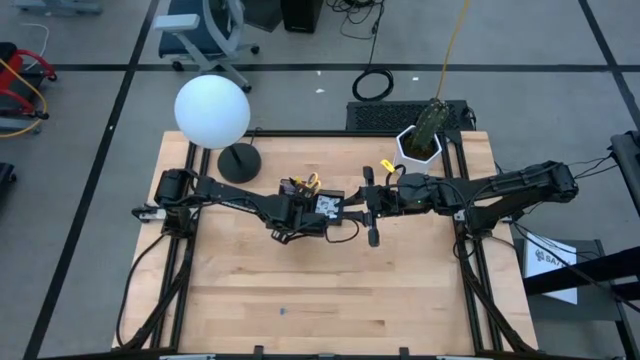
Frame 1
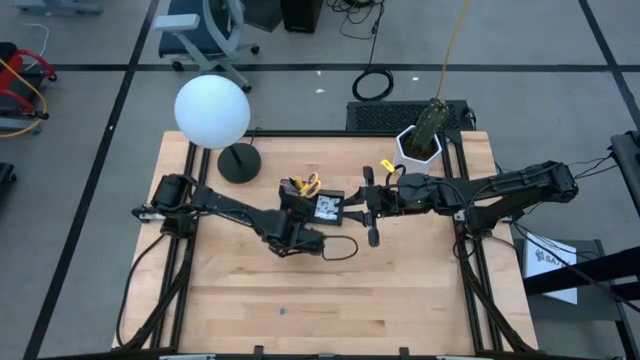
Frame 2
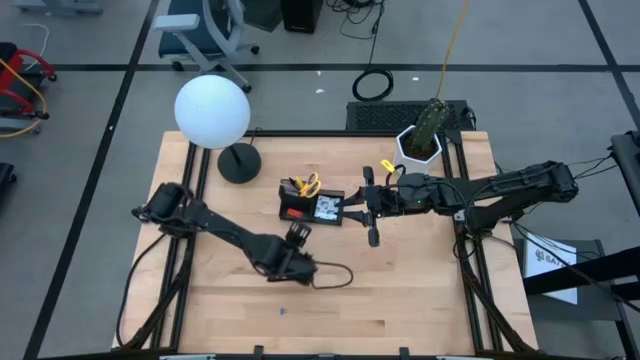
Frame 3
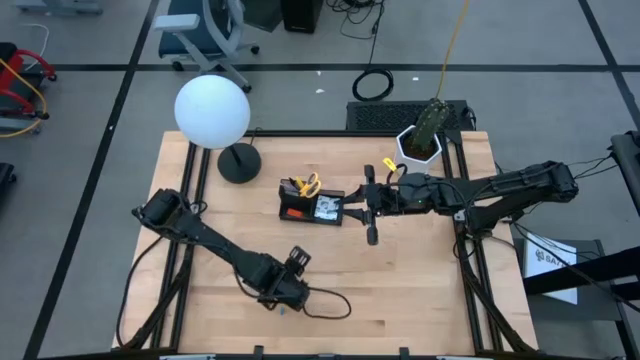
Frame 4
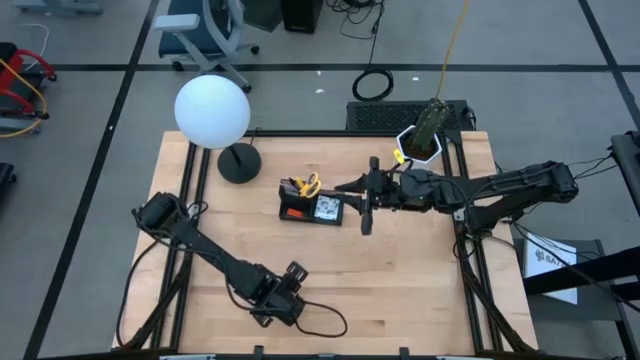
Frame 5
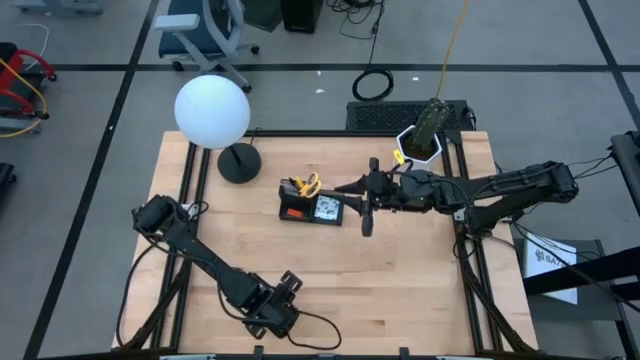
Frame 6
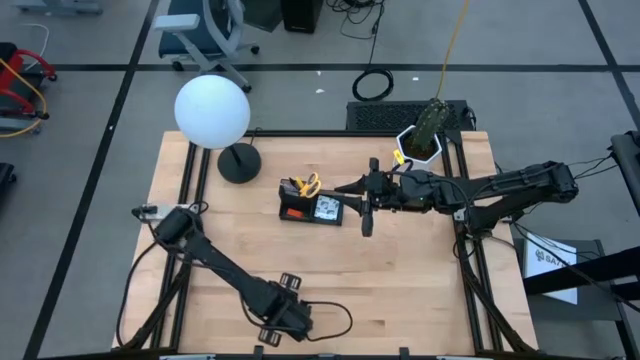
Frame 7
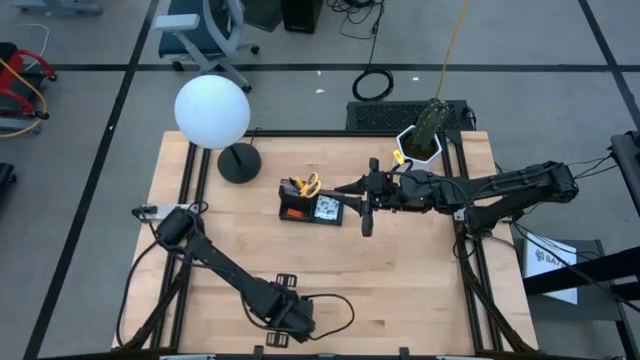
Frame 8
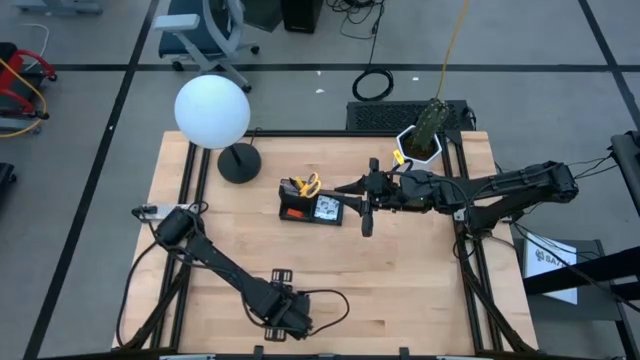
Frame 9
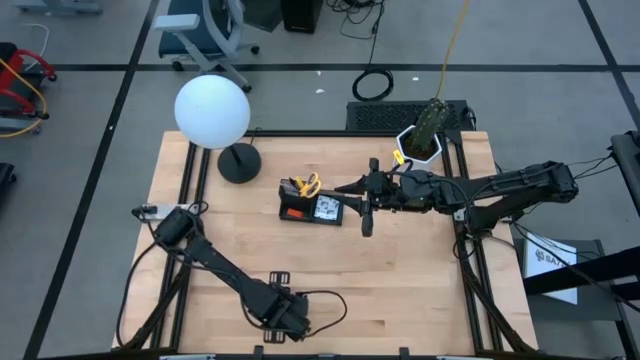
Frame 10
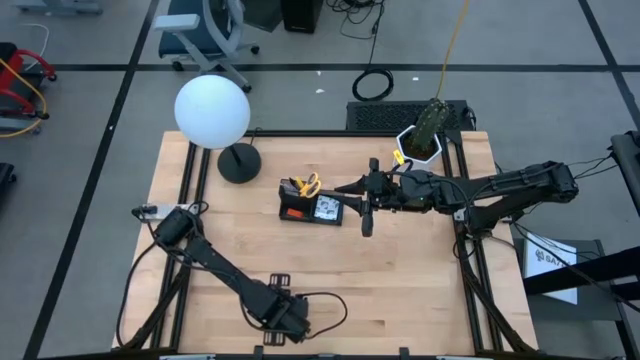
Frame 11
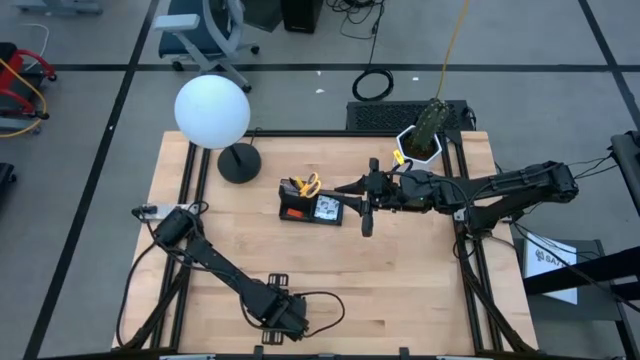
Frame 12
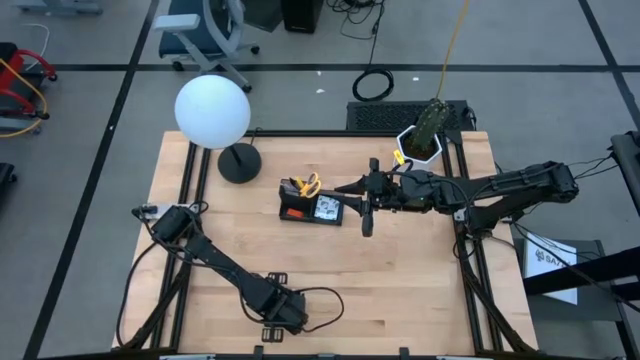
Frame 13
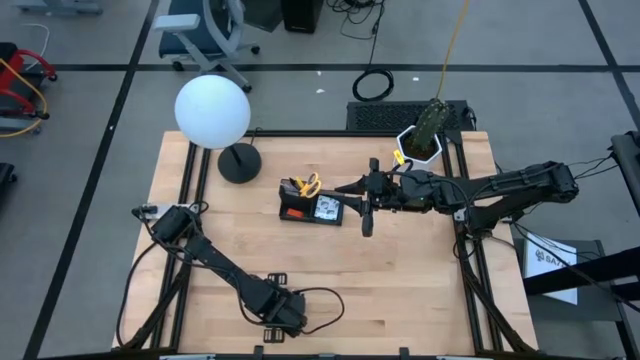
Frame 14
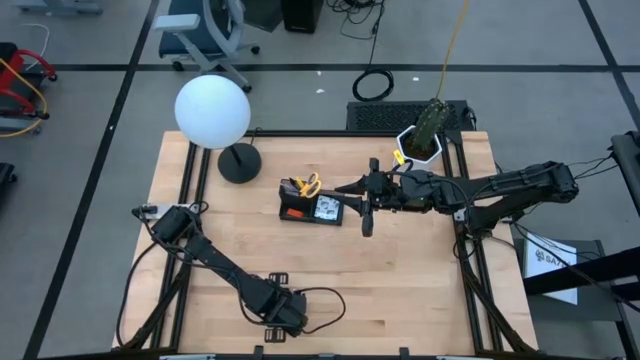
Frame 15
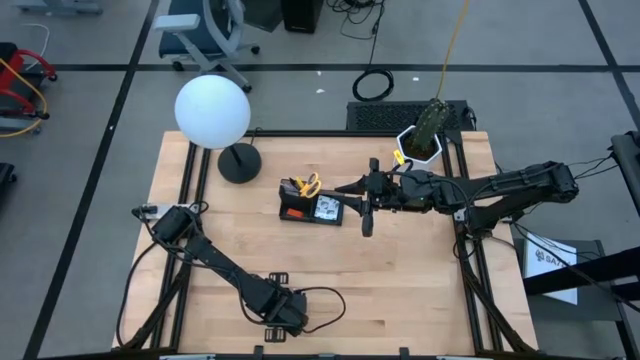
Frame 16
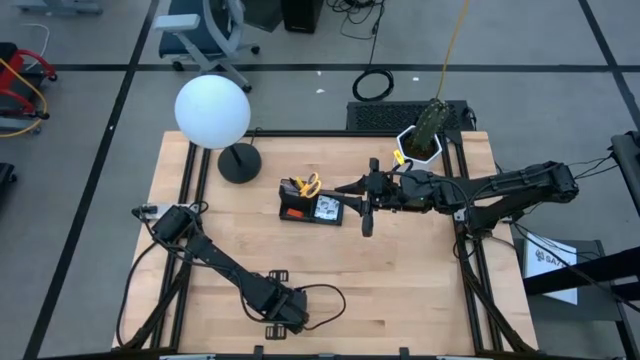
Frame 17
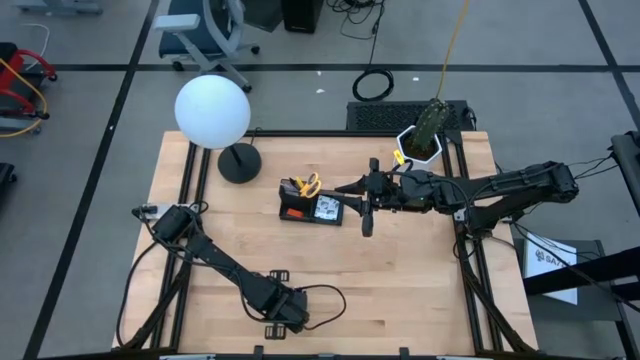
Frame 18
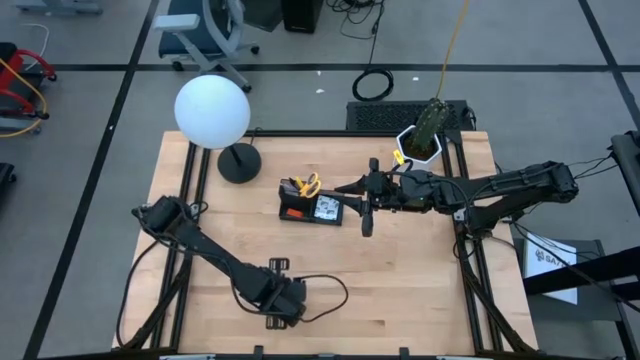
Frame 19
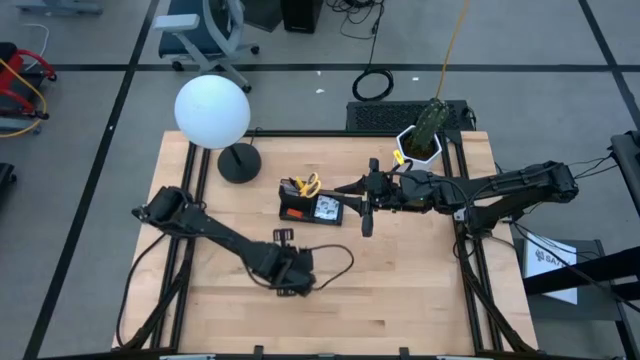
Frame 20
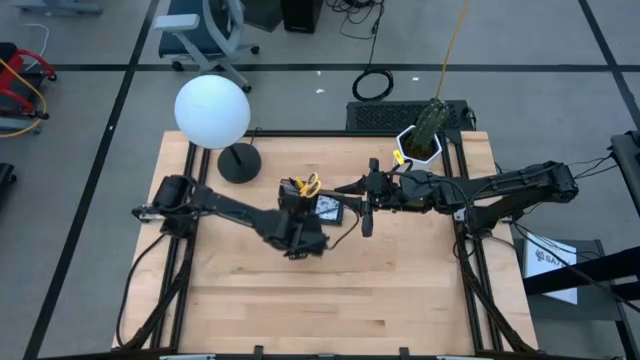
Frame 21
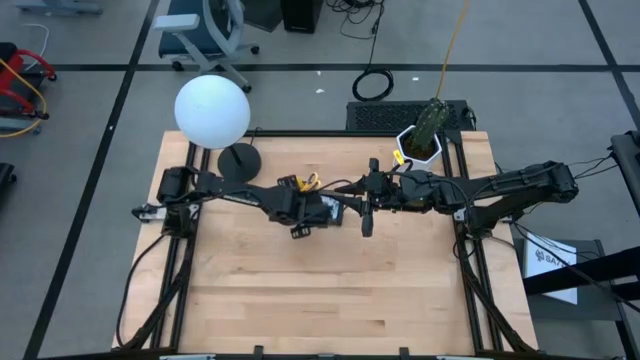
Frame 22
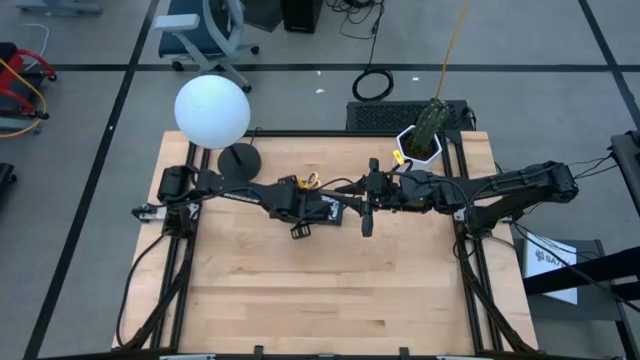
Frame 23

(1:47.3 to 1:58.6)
Task: Pick and place office supplies into organizer
Put the blue binder clip into the desk organizer

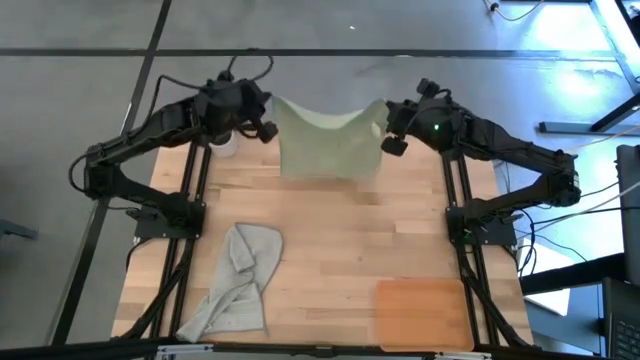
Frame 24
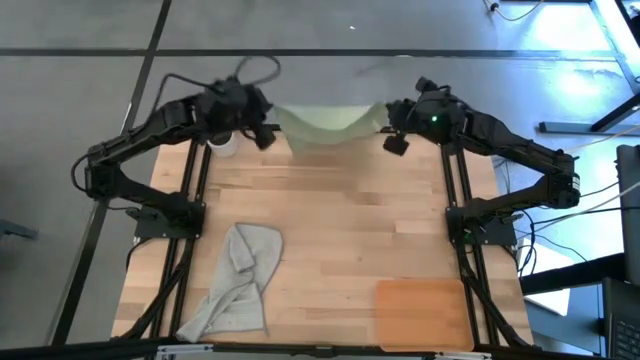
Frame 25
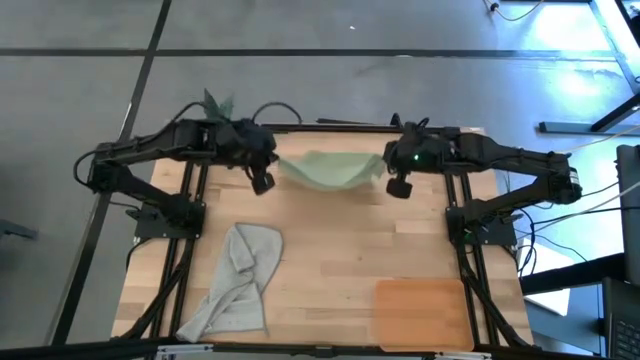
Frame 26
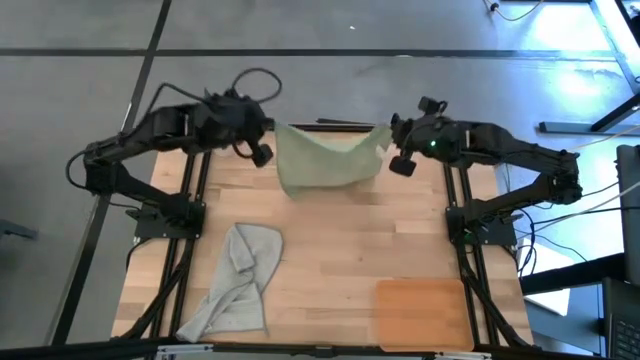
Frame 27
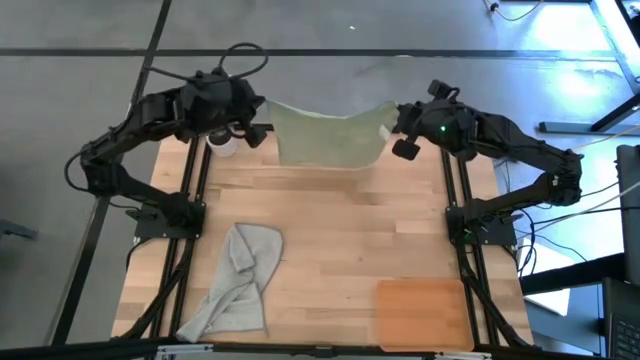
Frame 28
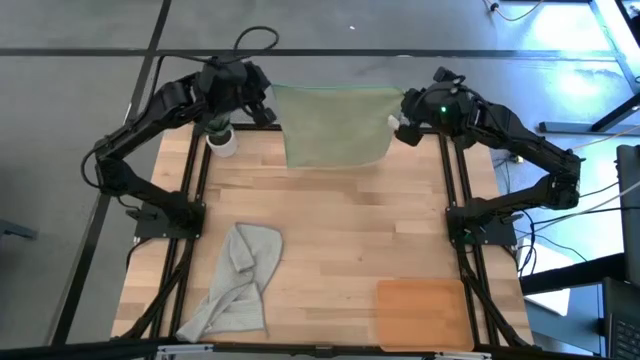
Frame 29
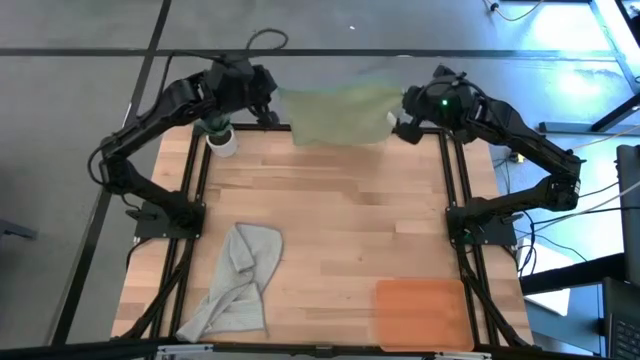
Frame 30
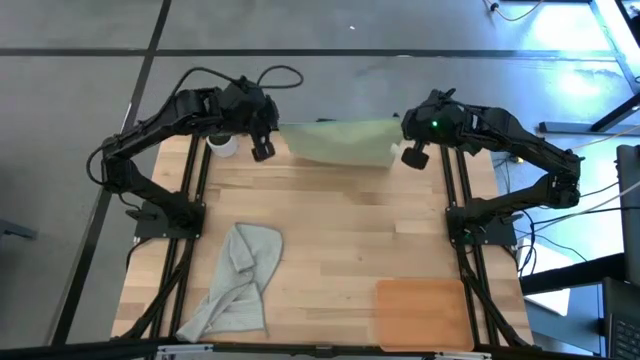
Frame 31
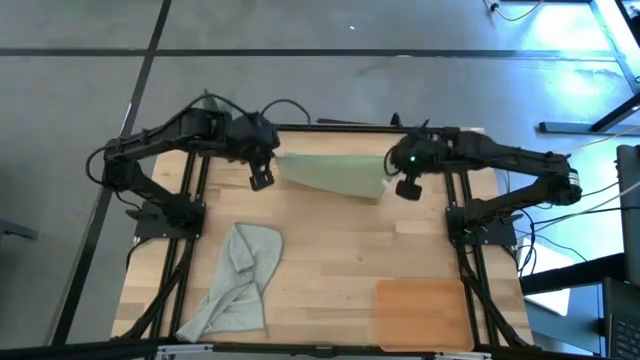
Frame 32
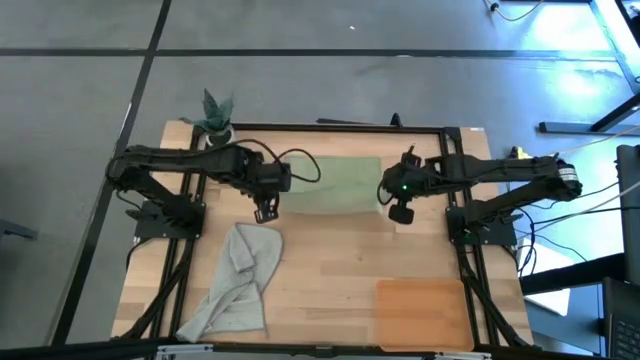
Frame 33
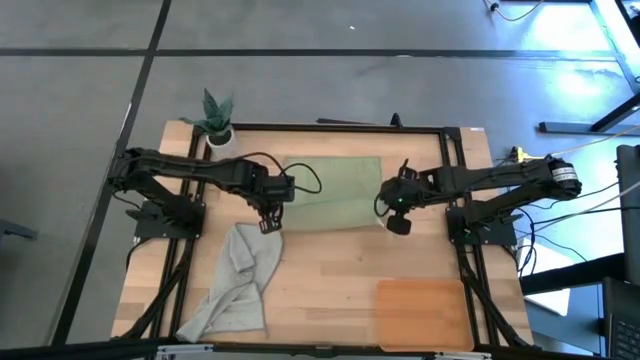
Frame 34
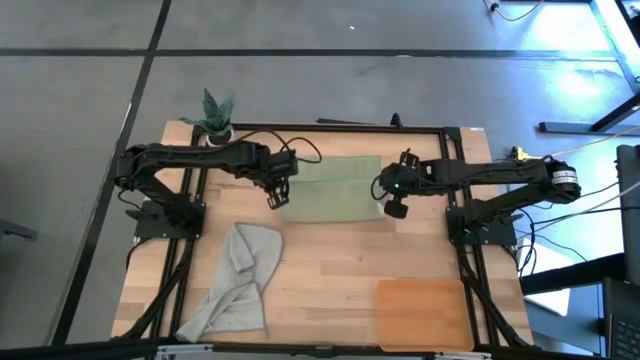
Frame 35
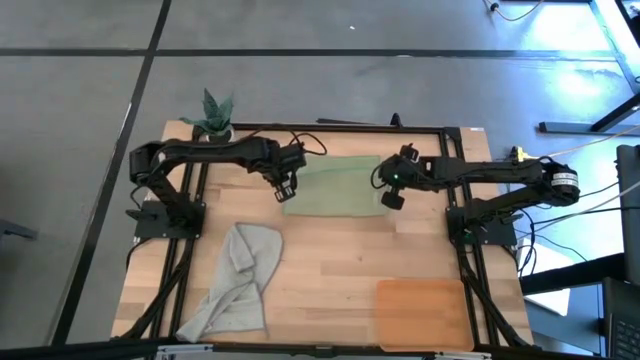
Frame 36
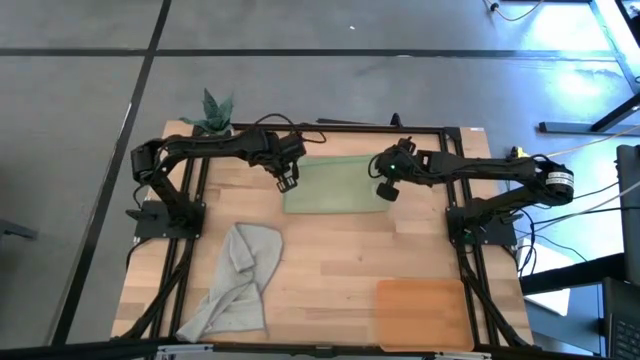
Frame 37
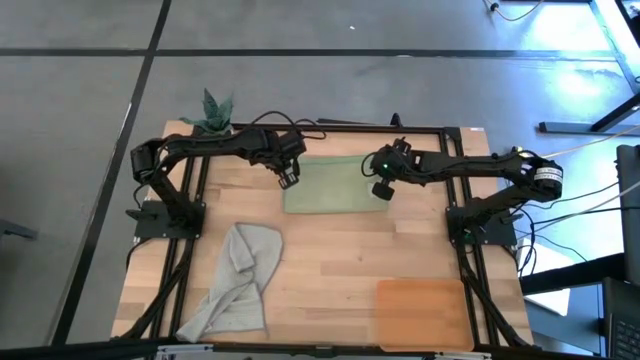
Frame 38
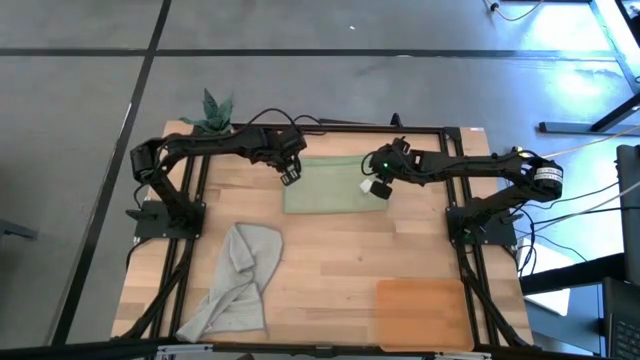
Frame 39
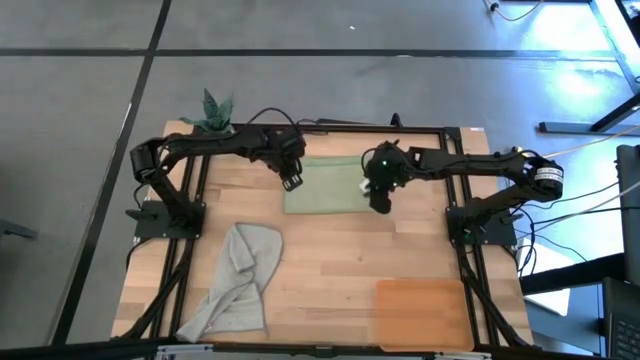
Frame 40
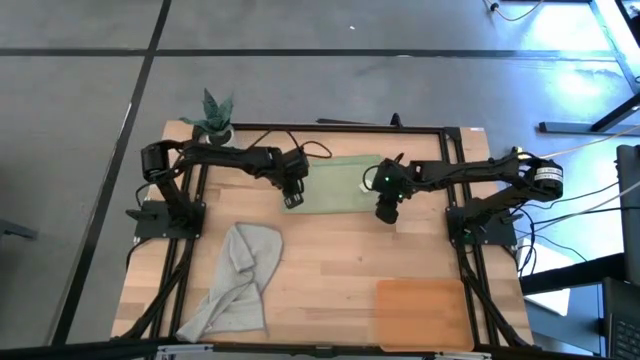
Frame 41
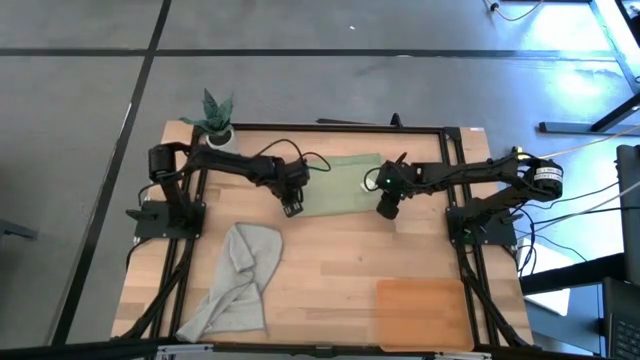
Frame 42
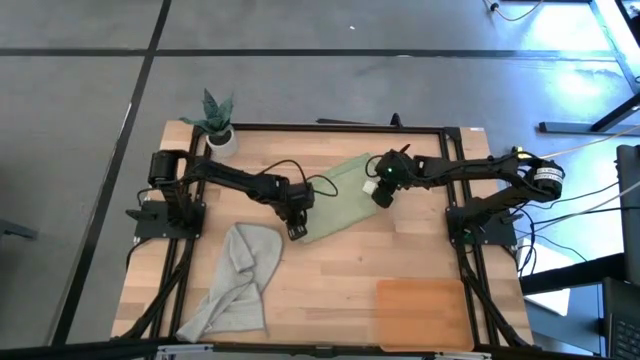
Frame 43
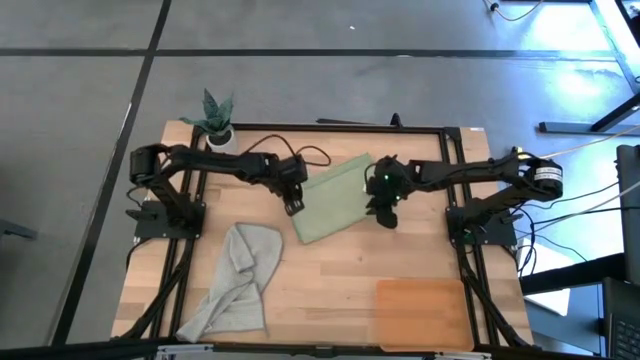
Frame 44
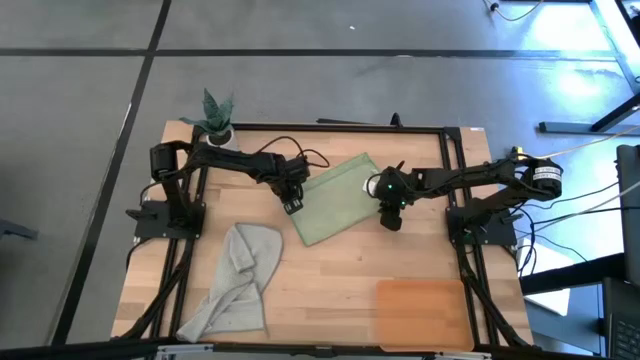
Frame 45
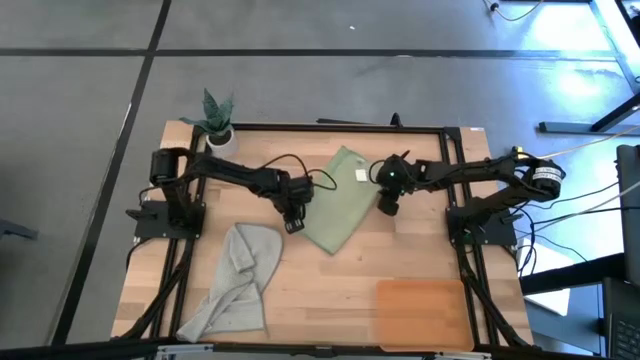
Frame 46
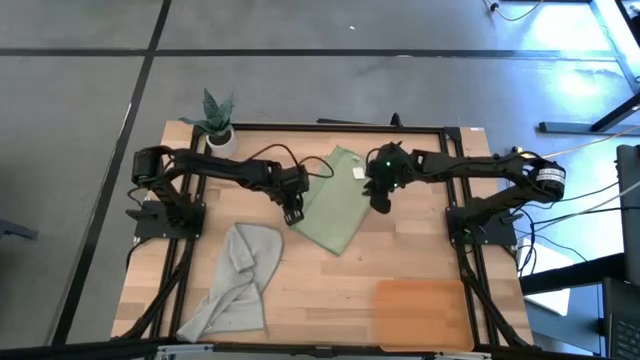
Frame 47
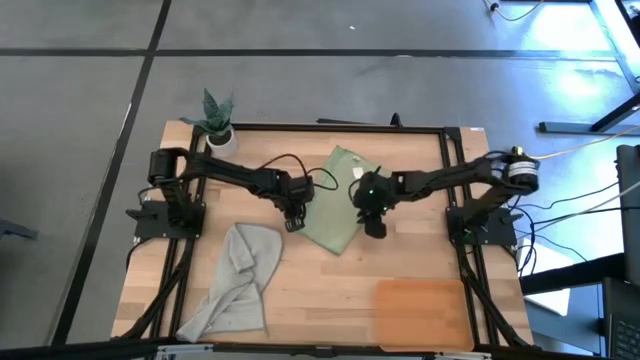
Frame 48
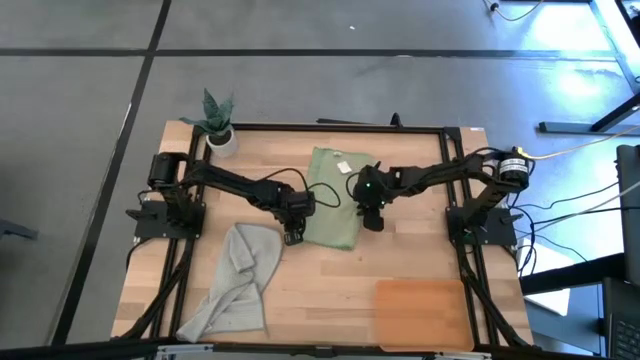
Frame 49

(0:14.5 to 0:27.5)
Task: Roll microfiber towels into tight, uniform cylinder then place into a basket
Fold the green microfiber cloth
